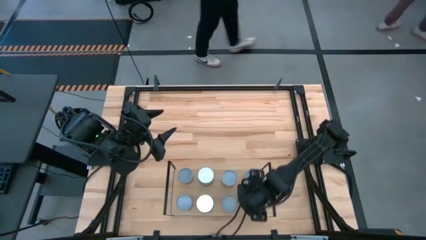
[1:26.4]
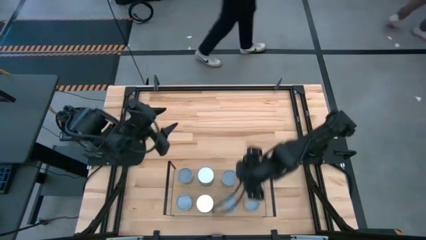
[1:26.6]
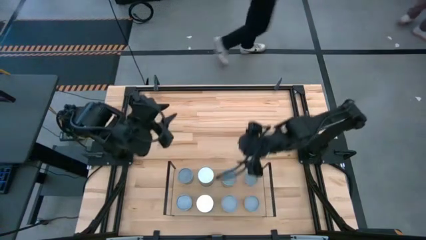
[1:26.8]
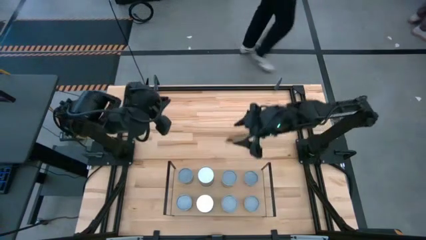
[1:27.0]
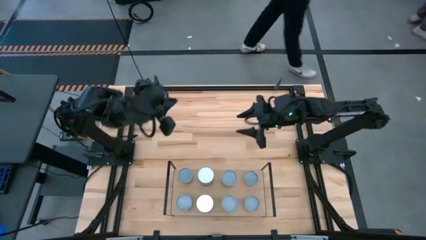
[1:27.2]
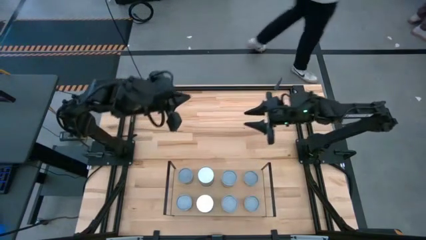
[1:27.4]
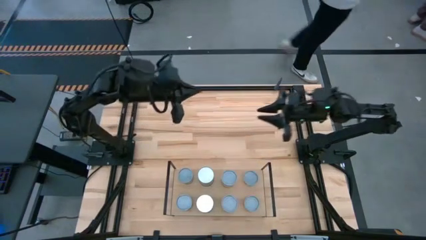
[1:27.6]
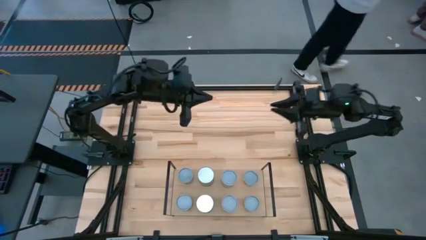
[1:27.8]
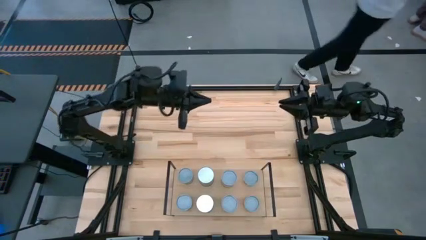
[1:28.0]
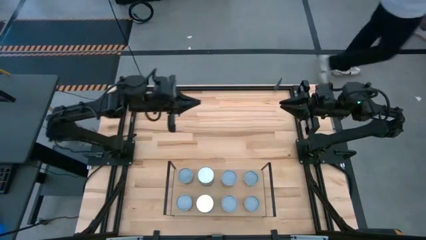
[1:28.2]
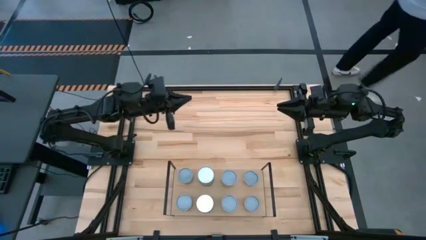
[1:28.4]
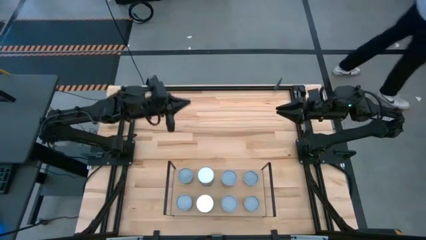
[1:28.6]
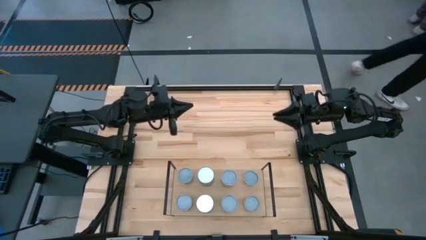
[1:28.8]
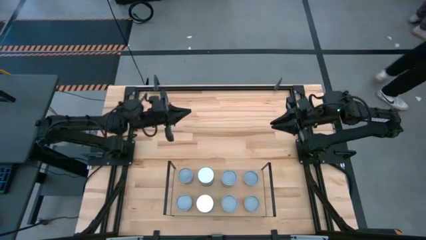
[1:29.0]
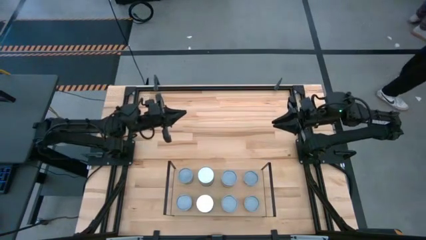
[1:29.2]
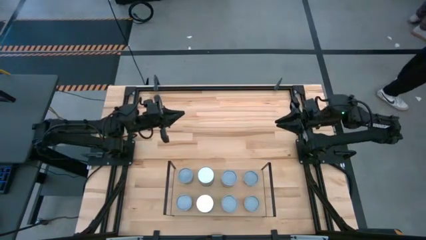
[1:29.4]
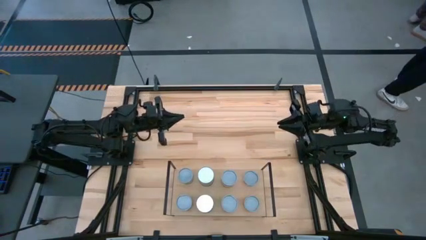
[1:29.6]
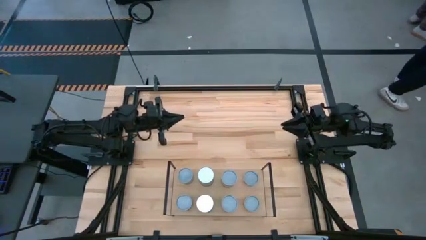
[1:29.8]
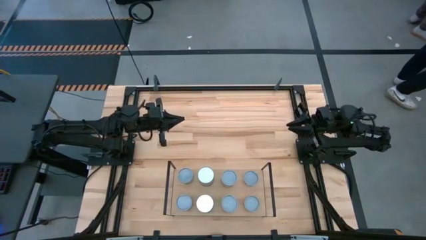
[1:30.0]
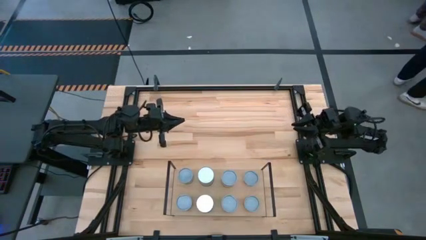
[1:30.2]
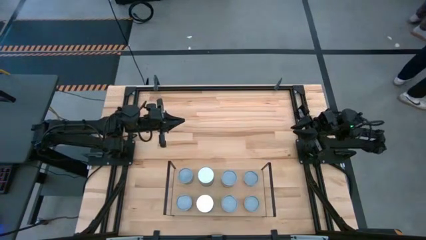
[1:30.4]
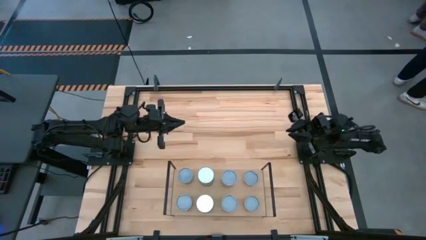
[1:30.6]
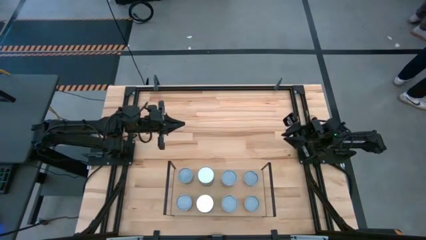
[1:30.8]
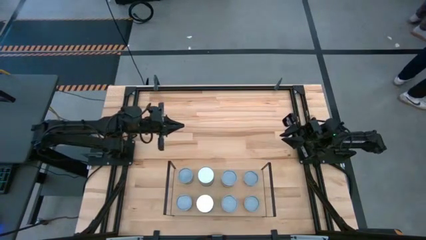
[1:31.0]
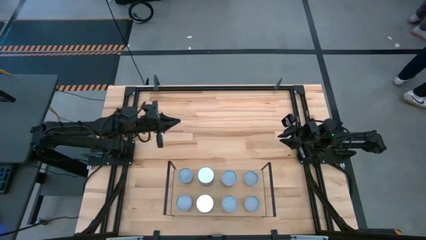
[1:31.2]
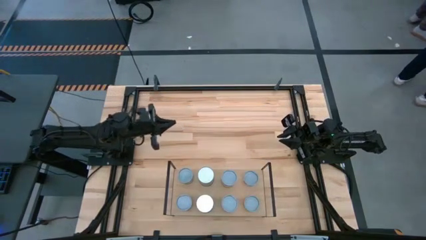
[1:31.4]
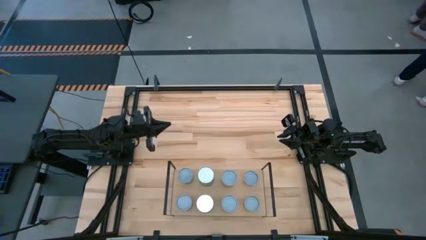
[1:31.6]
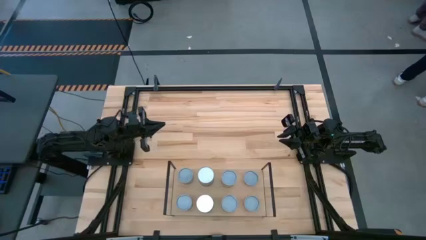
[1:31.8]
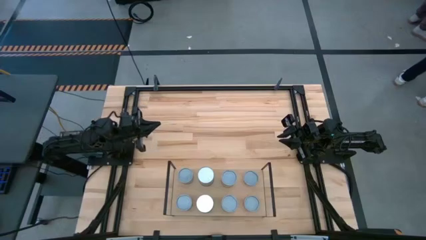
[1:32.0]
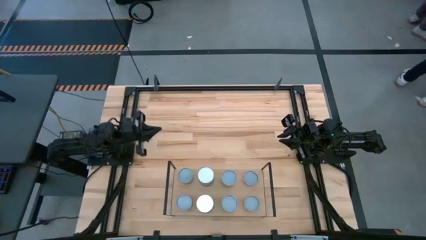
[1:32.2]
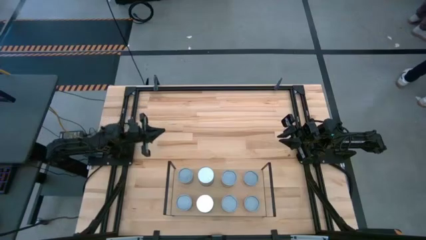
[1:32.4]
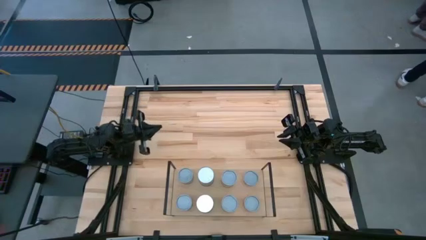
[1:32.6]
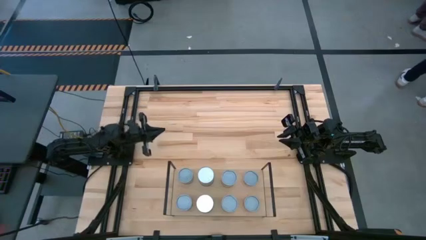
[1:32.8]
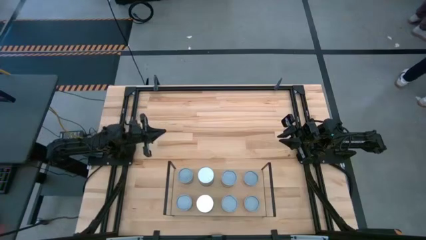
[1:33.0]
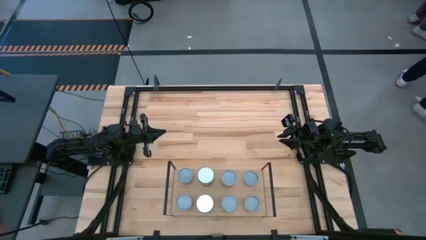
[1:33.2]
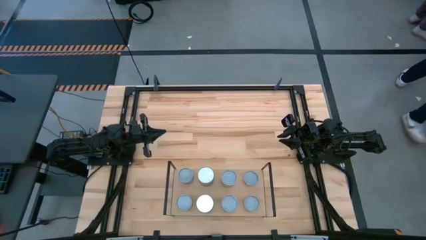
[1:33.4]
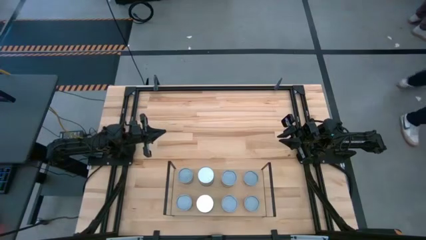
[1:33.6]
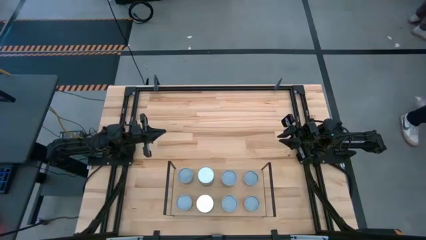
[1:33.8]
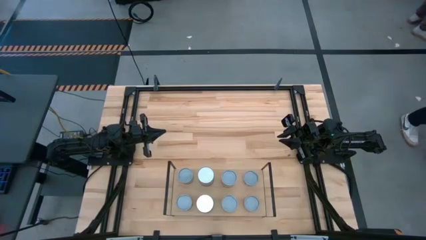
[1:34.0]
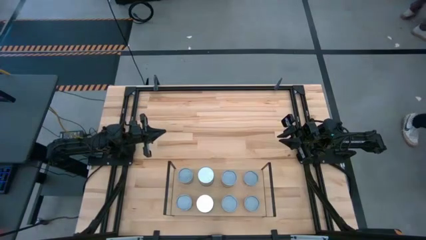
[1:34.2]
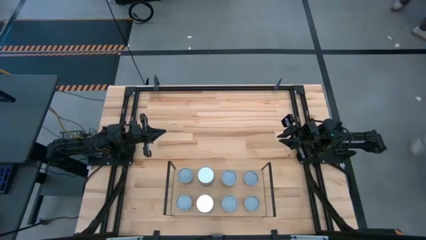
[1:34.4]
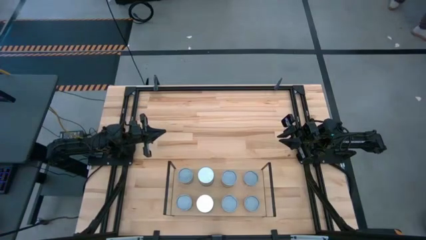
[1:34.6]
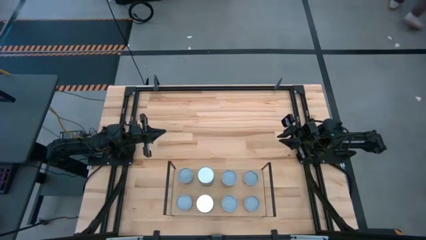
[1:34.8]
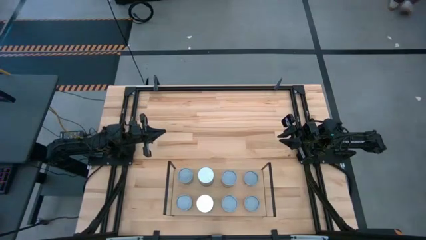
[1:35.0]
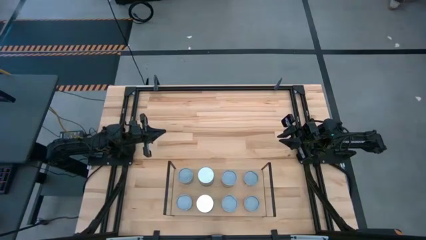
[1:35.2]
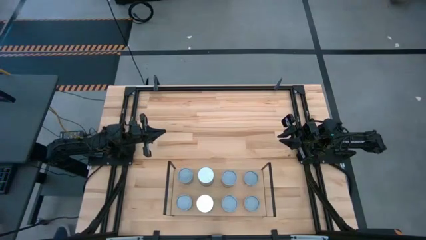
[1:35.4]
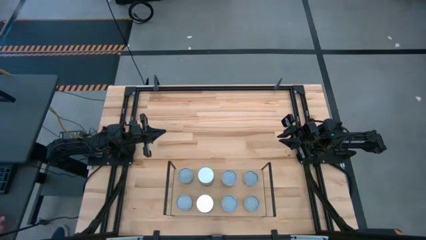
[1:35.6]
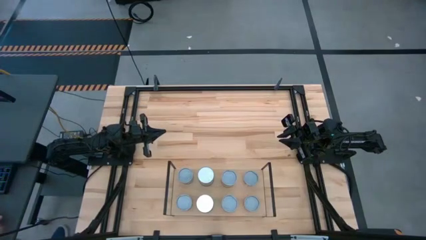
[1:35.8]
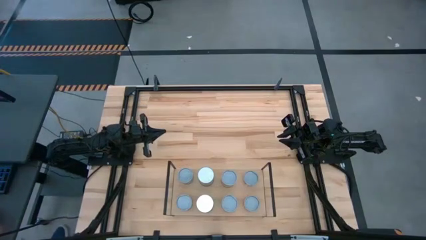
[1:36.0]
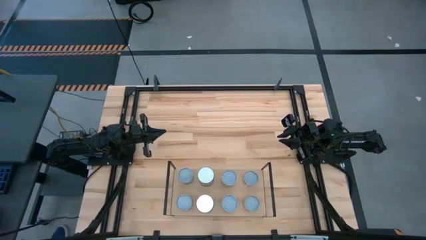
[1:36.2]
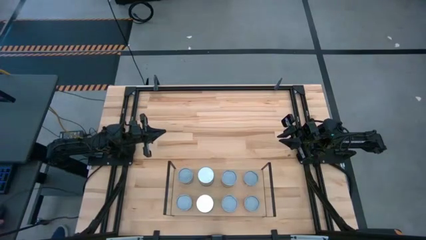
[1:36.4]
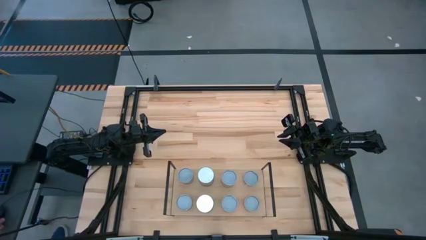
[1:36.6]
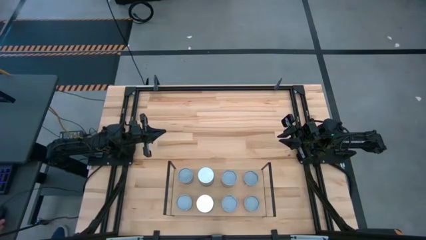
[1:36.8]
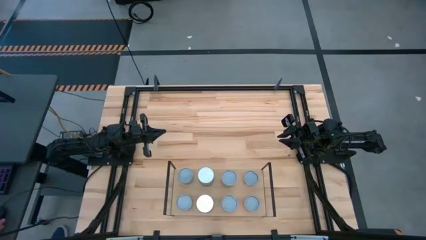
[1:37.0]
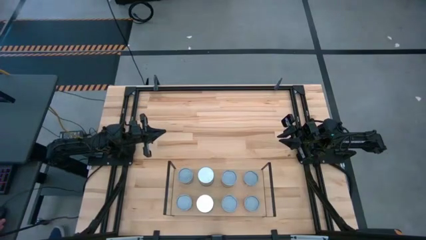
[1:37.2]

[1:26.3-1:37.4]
Task: Pick and place cans onto a shelf
Return to Home Position
